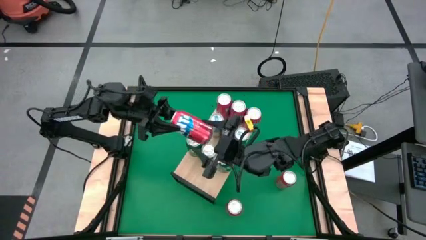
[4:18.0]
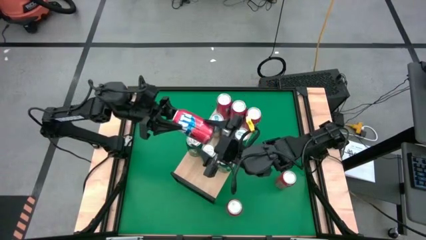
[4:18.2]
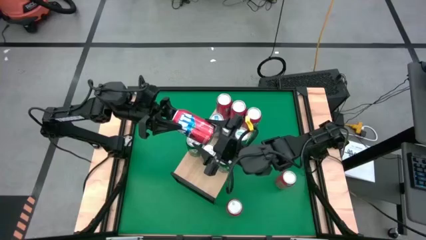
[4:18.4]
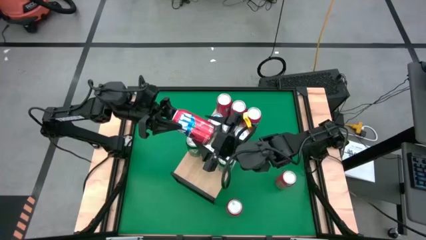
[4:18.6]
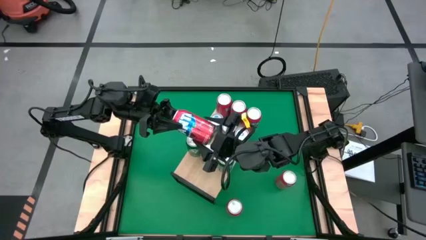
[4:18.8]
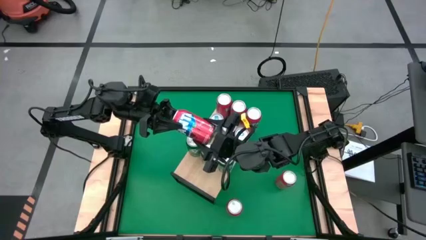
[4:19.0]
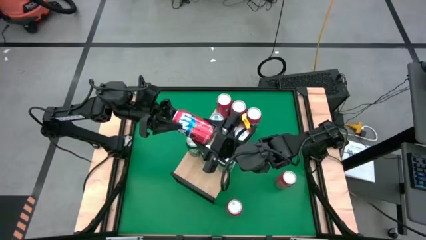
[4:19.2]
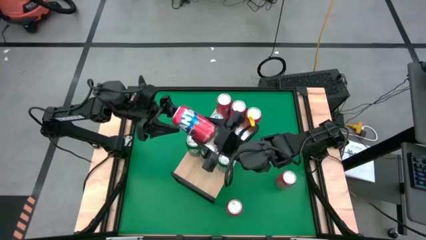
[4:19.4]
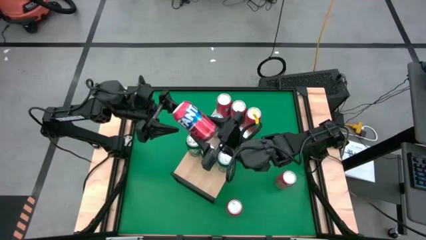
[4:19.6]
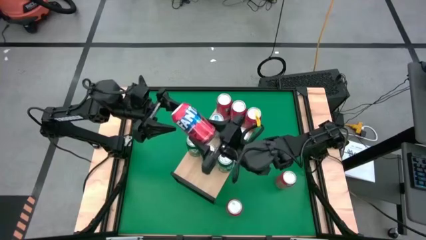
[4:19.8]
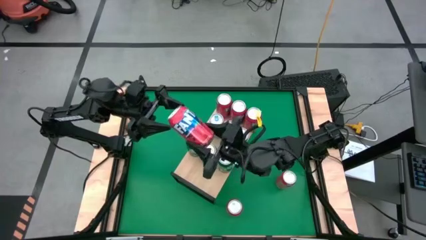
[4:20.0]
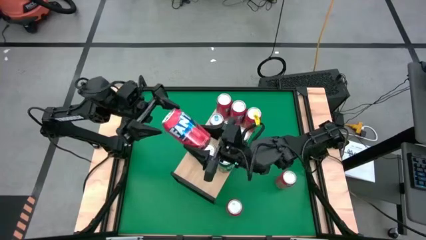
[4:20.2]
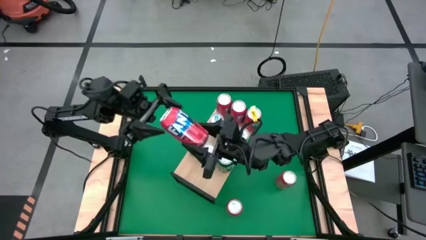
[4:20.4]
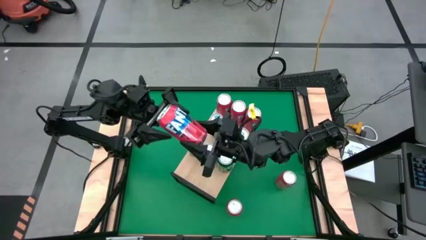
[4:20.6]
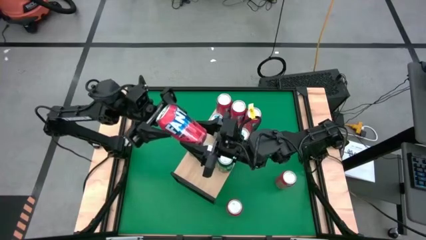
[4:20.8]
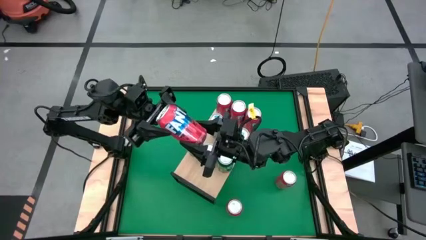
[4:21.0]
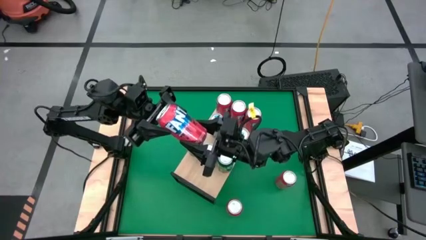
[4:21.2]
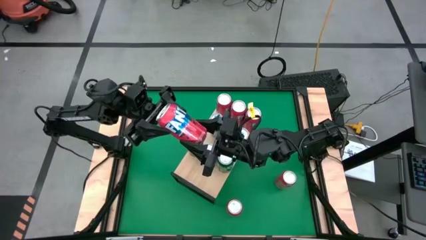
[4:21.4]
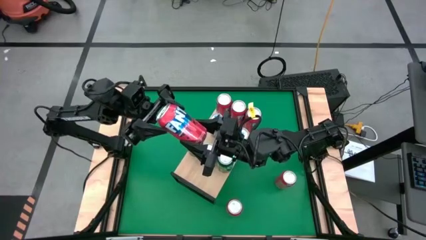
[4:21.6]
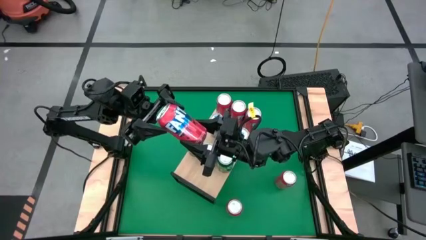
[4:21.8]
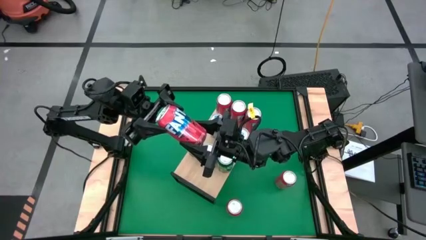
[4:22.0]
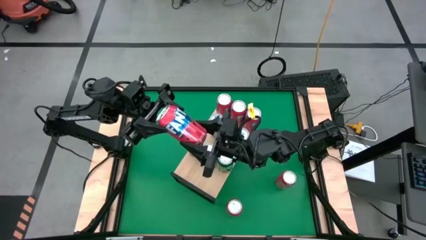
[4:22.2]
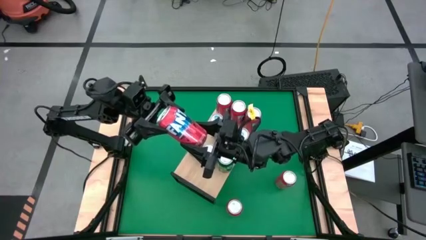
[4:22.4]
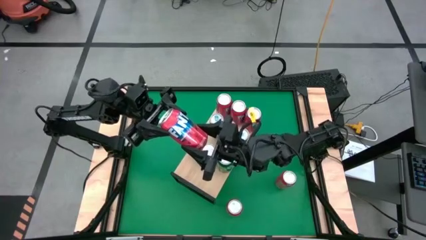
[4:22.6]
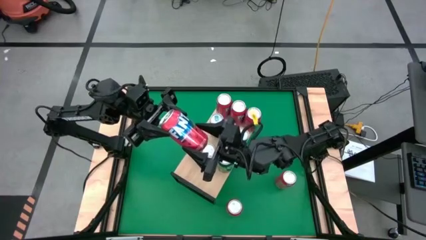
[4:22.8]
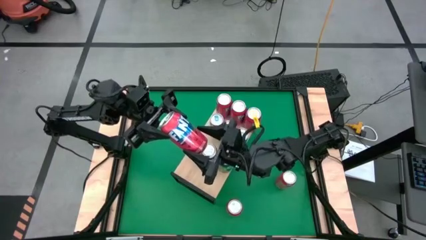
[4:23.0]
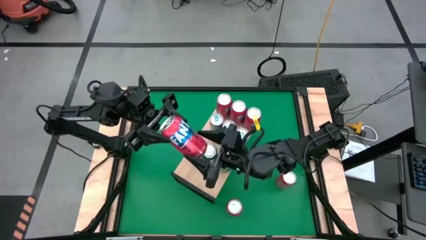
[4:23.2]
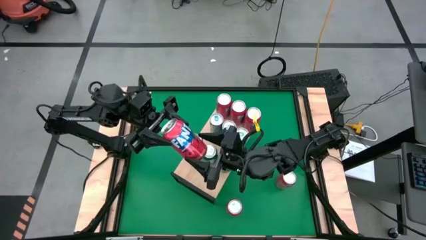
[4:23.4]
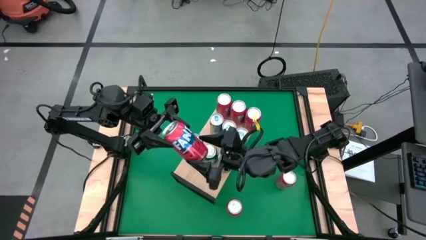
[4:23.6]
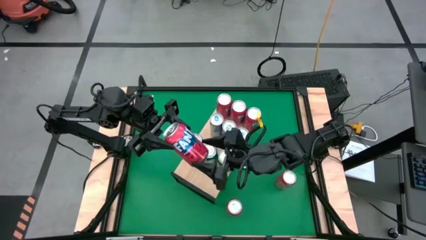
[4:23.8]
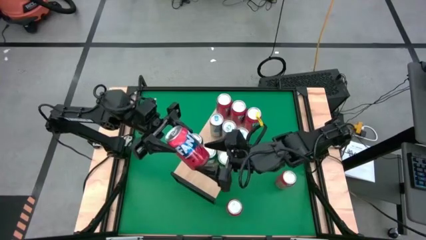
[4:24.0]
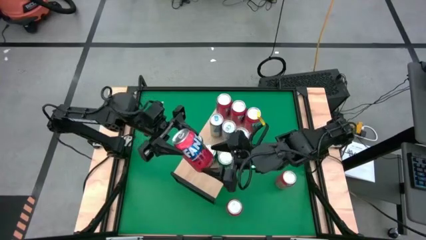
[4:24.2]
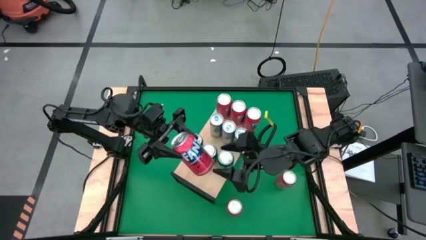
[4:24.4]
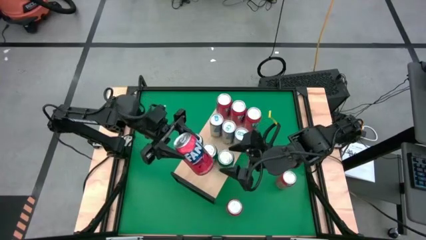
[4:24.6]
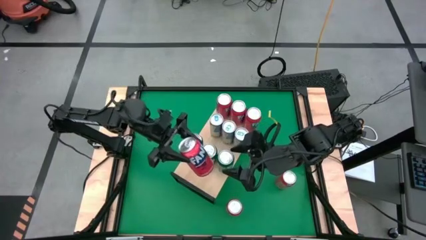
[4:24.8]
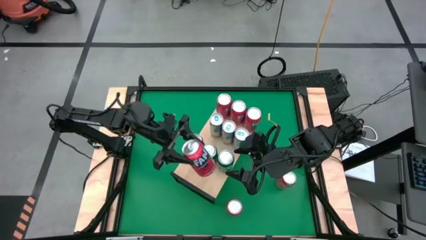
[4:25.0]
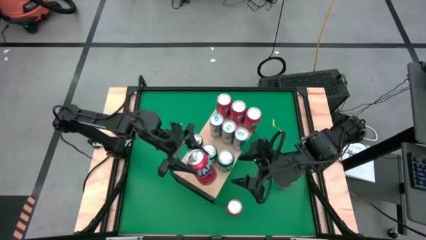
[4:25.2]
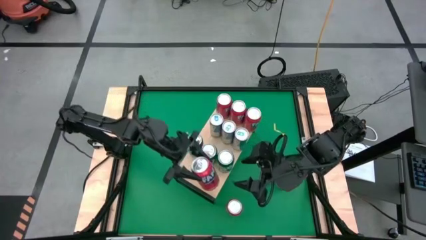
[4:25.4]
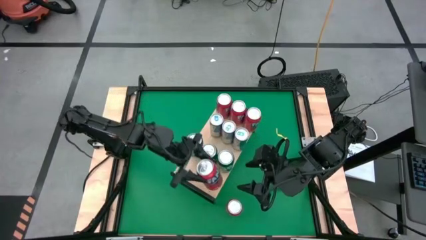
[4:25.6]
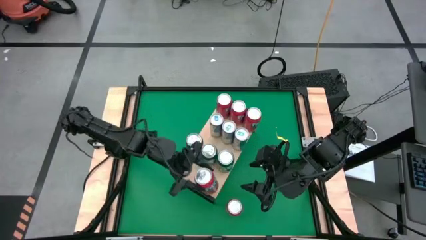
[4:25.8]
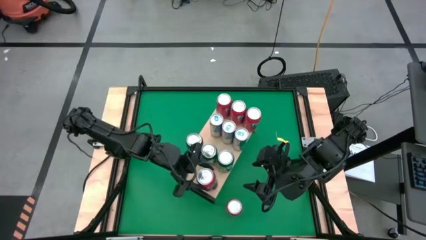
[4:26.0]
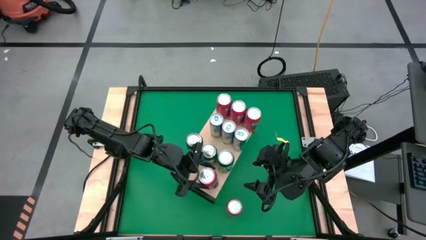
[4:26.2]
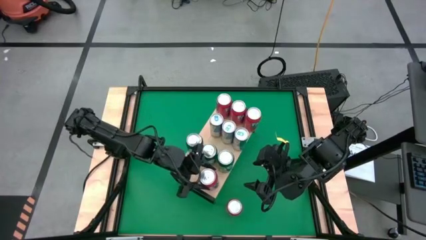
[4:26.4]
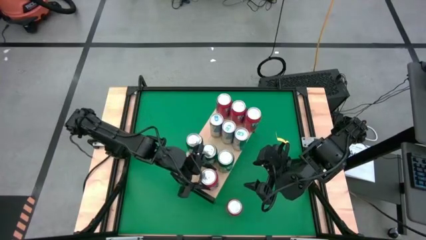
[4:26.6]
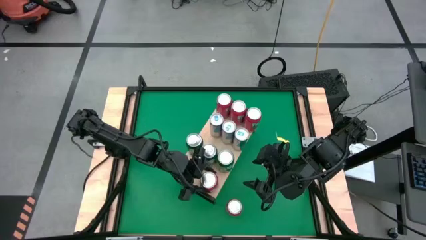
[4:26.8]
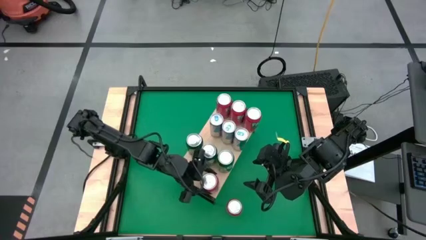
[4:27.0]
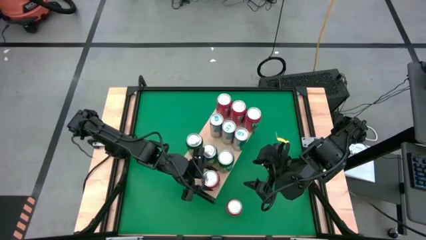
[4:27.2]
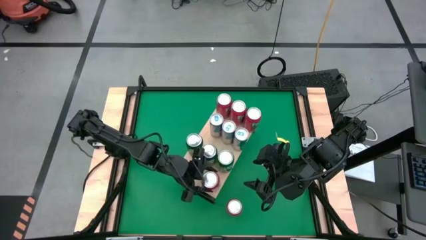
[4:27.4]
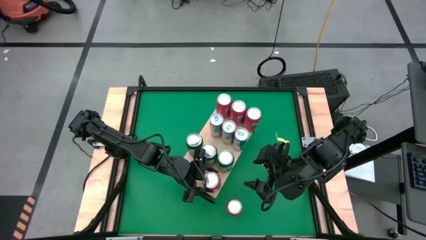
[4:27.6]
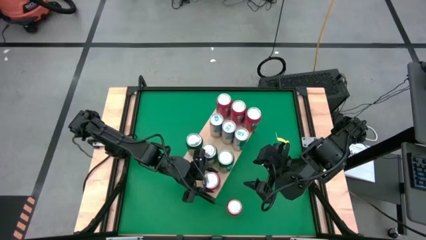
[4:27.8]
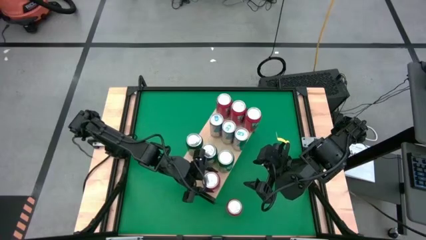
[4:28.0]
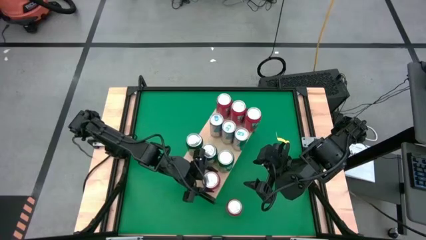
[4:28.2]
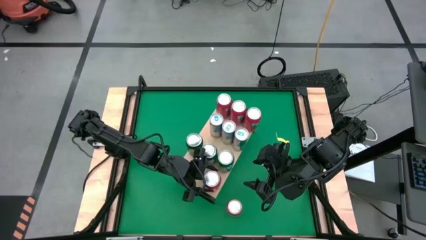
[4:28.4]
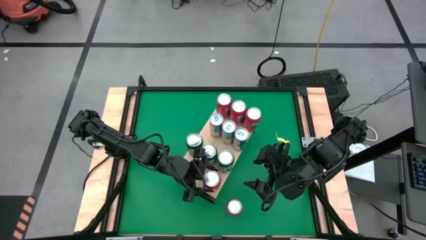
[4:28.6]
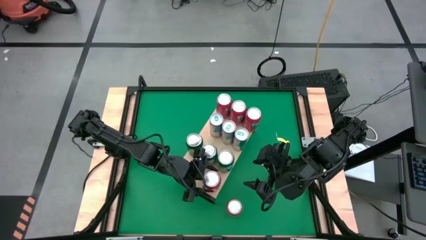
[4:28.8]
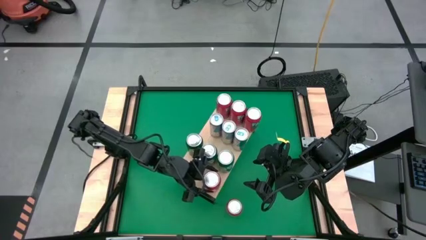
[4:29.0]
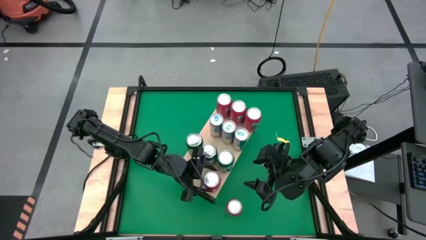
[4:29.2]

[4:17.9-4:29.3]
Task: Sort soda cans
Put the red soda can on the shelf

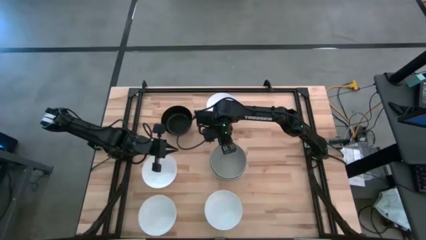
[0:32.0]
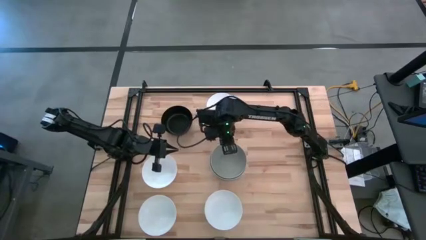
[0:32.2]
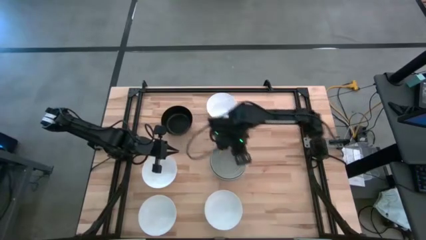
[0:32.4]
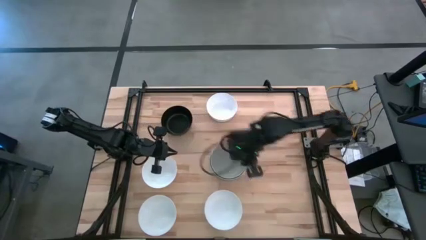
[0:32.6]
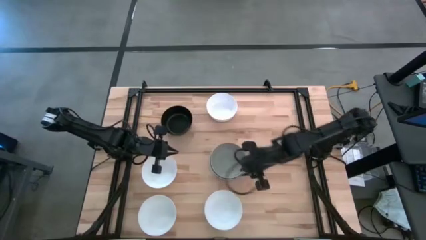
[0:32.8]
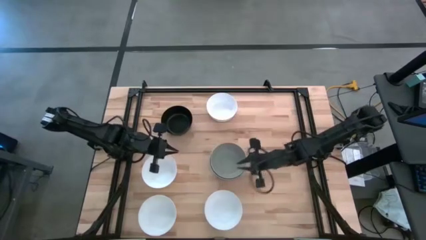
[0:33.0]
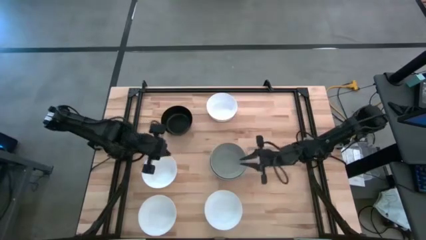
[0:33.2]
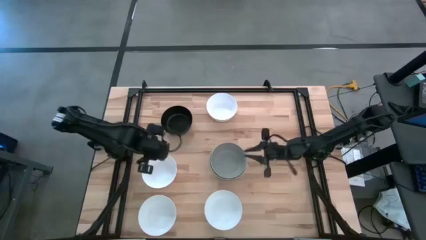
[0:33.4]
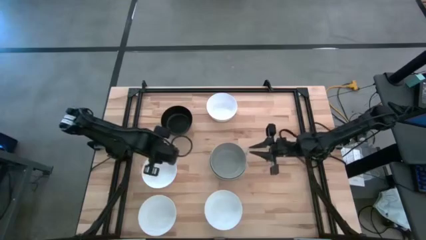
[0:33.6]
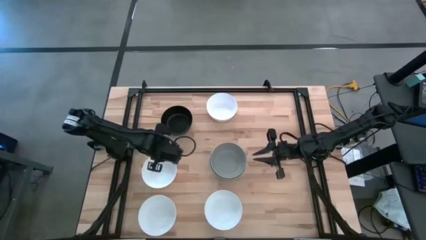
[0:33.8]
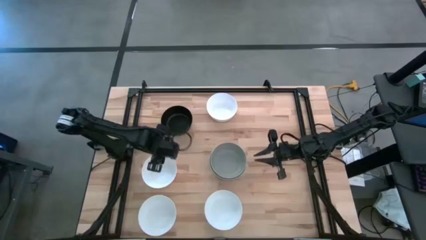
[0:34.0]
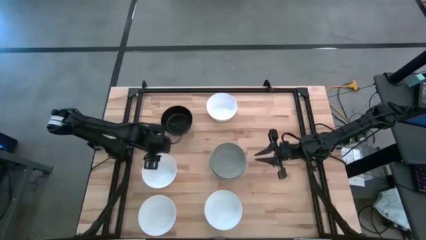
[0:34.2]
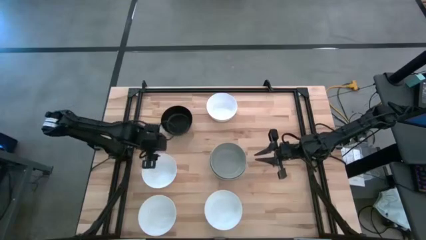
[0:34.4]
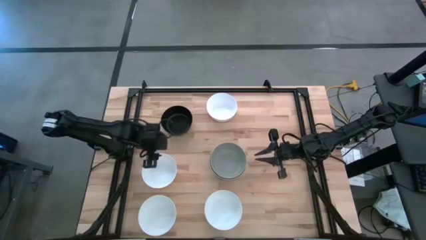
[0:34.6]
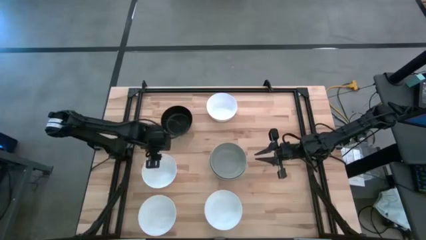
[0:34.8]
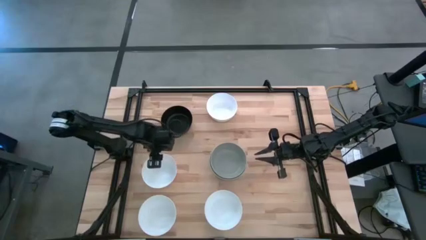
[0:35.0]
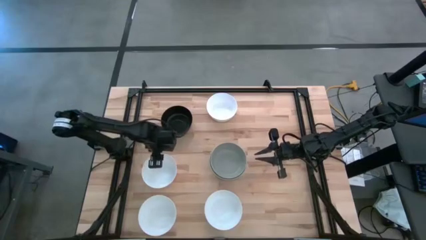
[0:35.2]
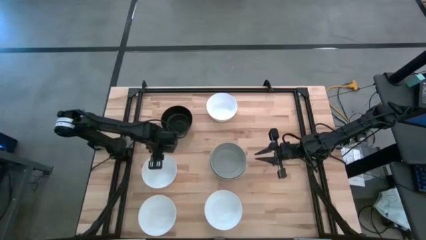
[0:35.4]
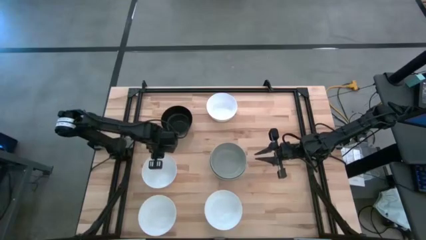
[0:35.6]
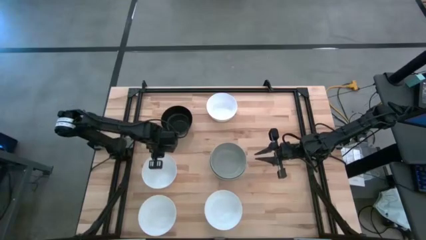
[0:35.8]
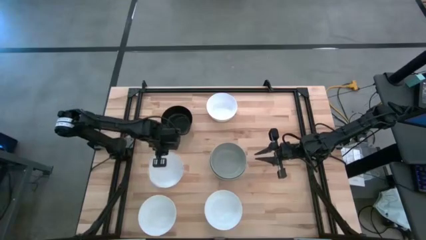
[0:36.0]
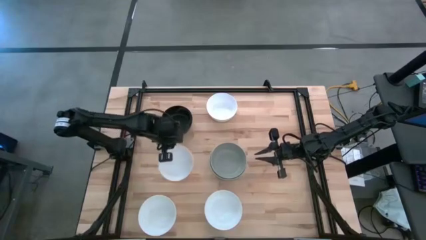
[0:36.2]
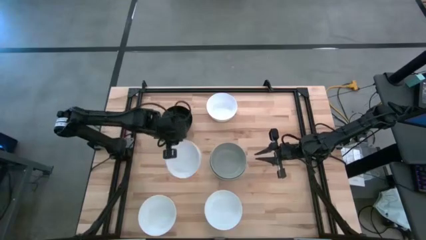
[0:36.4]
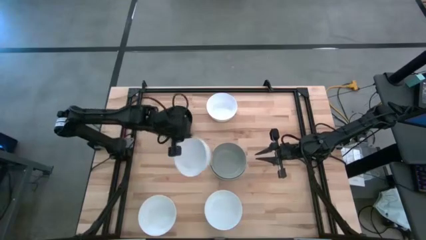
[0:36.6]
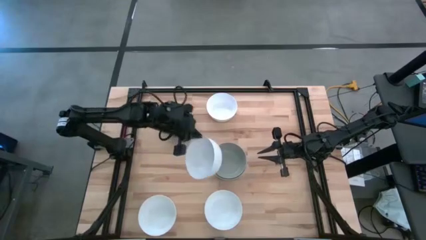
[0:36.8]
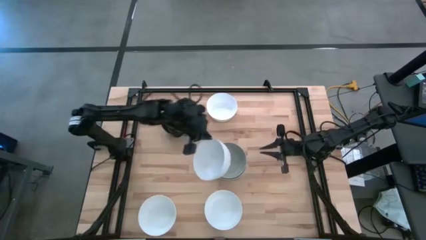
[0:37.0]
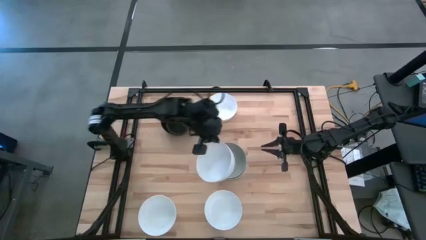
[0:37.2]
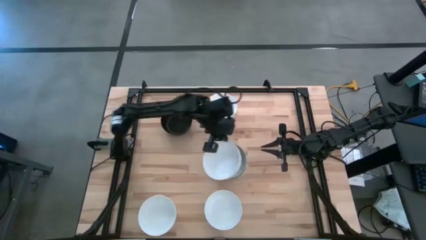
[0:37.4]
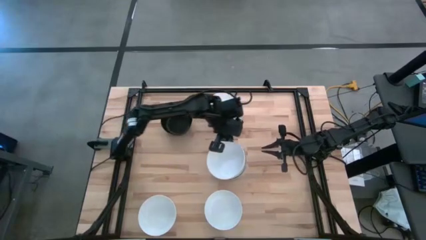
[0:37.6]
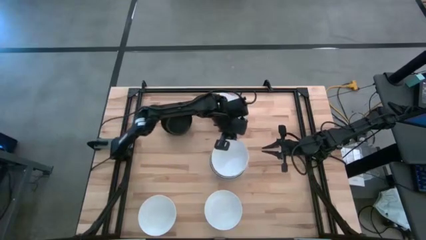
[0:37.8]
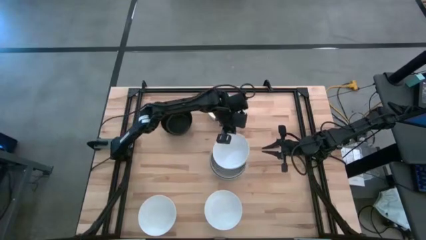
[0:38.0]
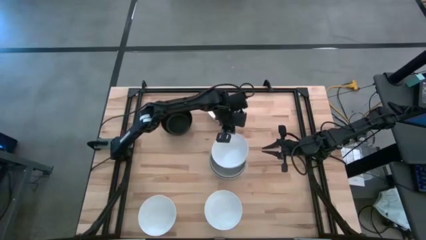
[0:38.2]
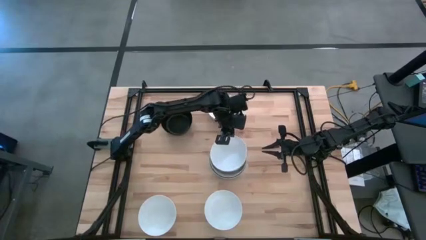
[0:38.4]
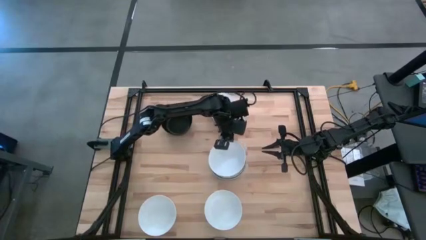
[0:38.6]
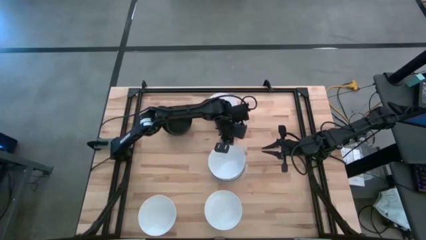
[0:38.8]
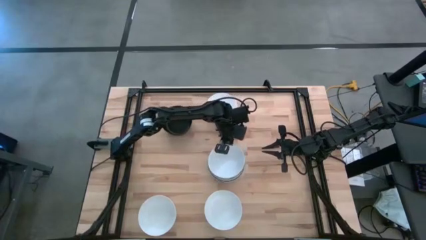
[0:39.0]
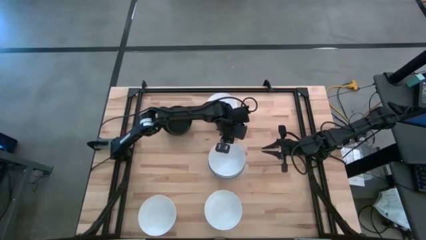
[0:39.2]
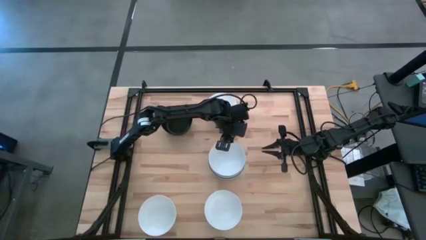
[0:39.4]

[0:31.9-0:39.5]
Task: Nest bowls inside each other
Stack the white bowl on top of the brown bowl
